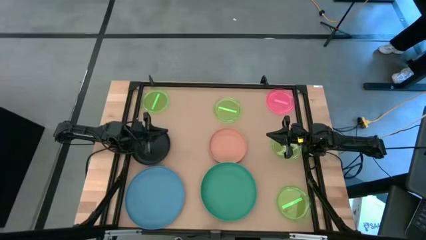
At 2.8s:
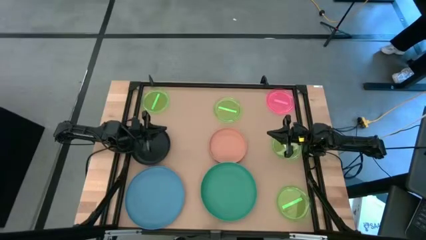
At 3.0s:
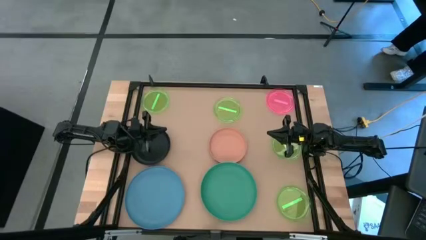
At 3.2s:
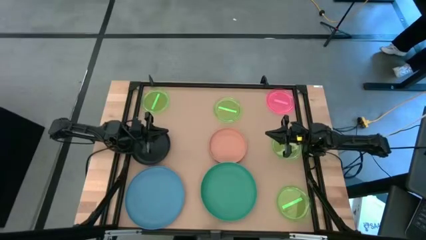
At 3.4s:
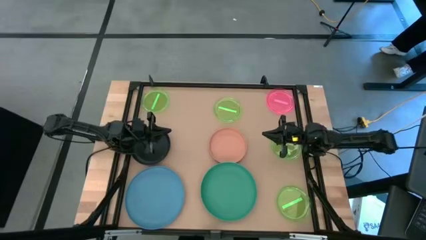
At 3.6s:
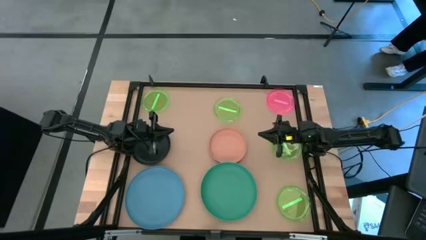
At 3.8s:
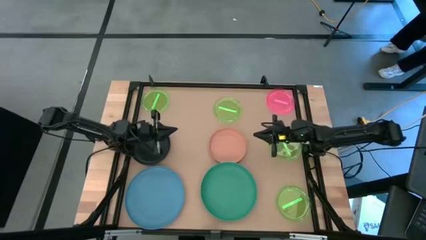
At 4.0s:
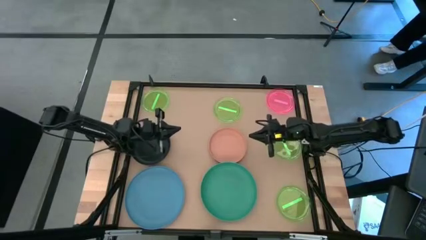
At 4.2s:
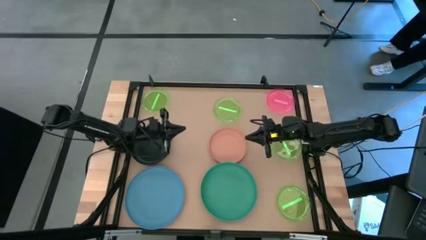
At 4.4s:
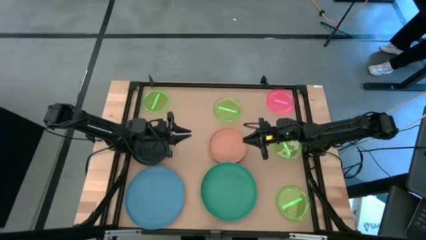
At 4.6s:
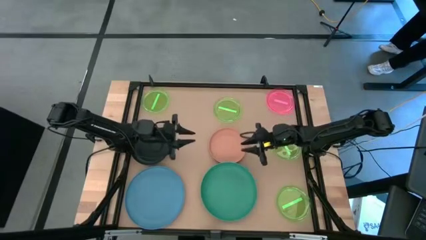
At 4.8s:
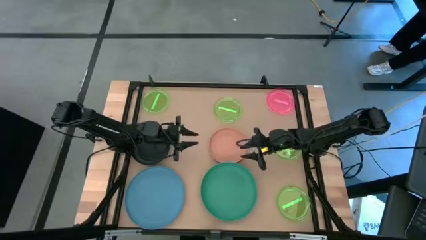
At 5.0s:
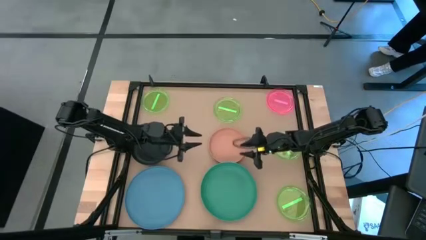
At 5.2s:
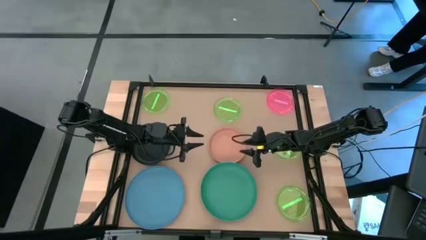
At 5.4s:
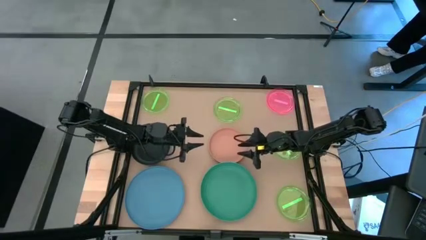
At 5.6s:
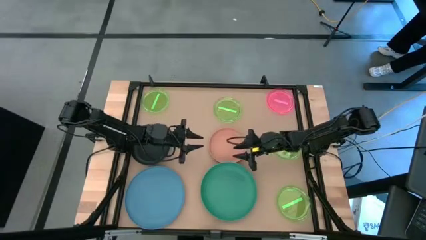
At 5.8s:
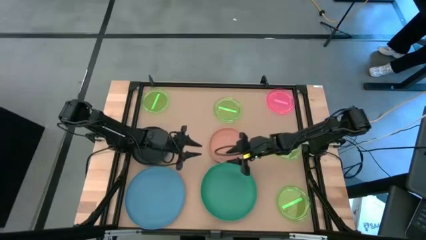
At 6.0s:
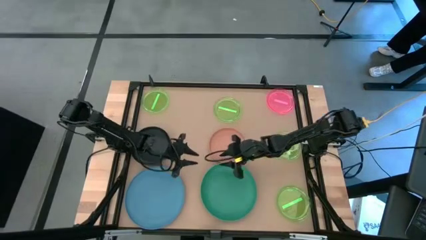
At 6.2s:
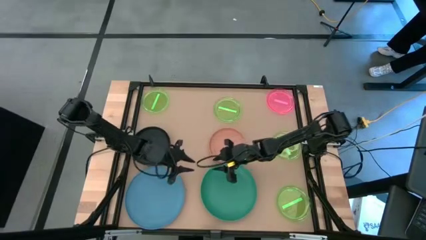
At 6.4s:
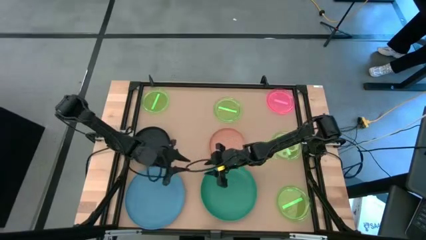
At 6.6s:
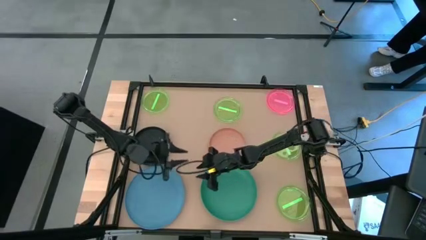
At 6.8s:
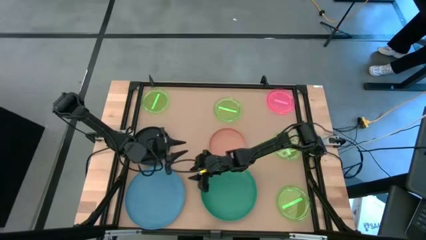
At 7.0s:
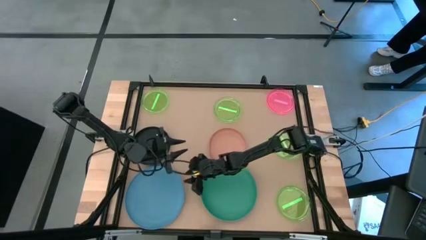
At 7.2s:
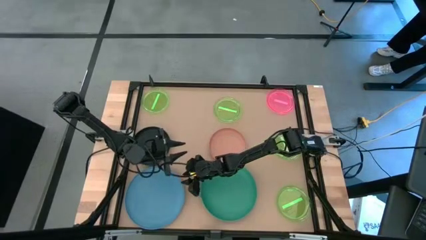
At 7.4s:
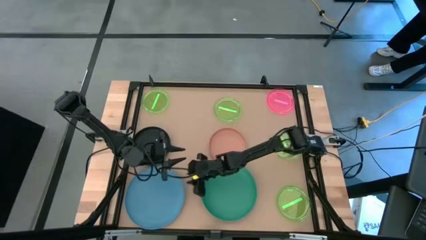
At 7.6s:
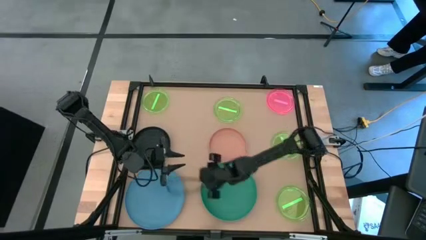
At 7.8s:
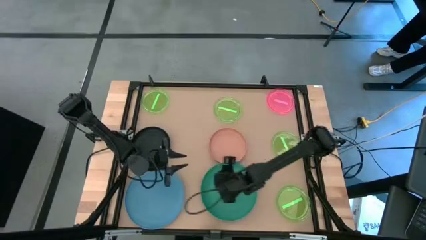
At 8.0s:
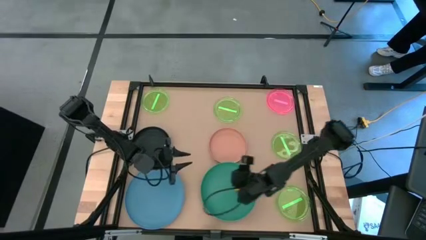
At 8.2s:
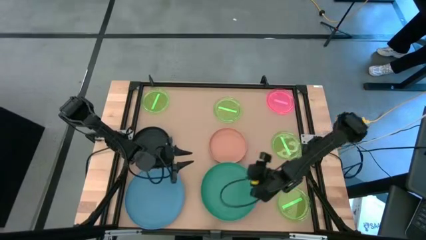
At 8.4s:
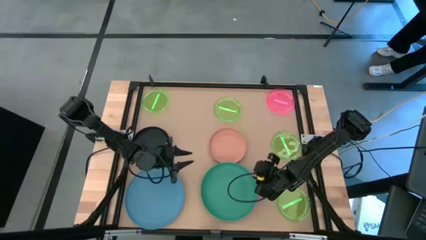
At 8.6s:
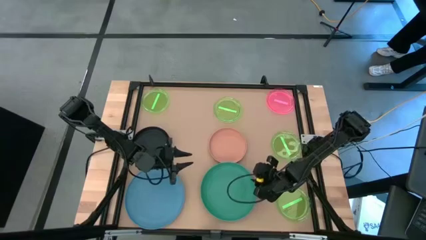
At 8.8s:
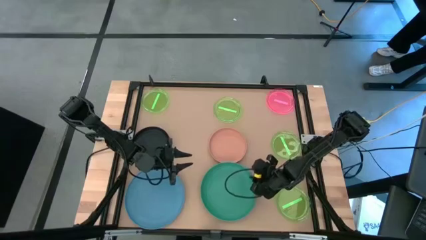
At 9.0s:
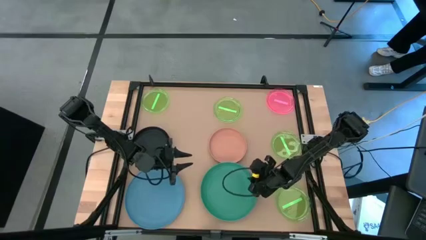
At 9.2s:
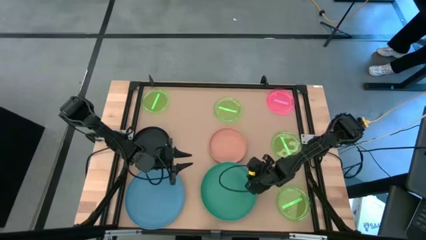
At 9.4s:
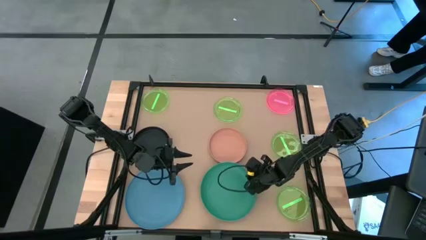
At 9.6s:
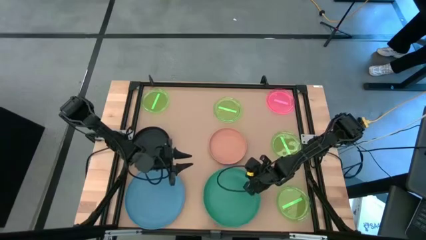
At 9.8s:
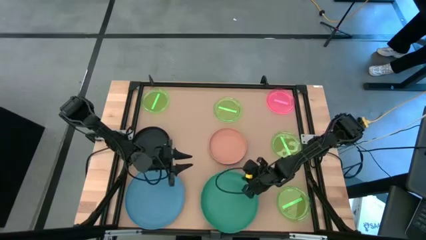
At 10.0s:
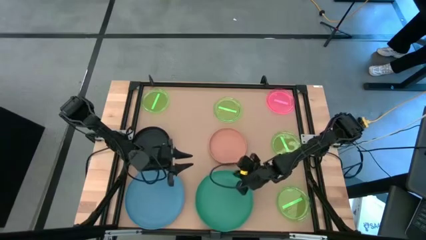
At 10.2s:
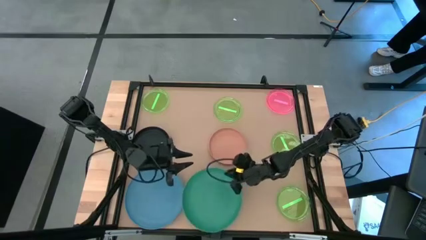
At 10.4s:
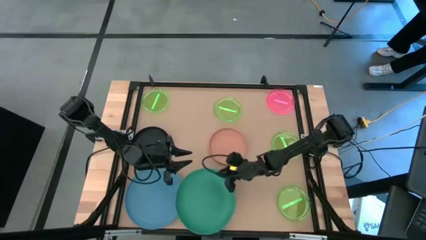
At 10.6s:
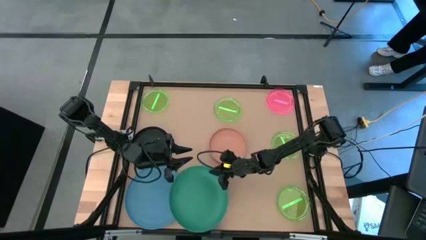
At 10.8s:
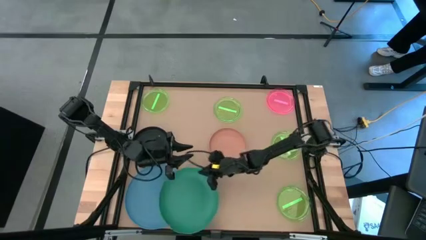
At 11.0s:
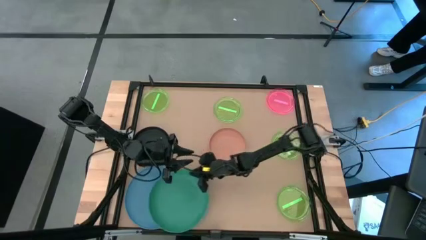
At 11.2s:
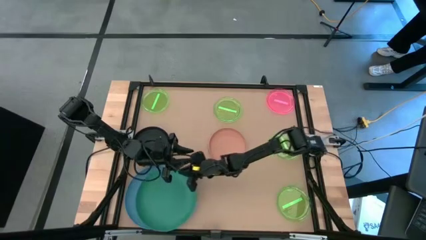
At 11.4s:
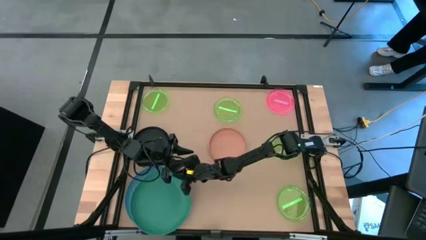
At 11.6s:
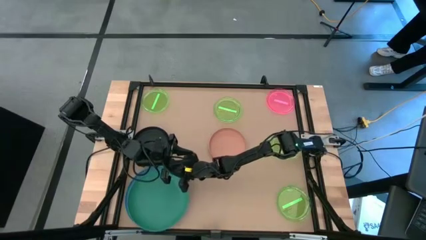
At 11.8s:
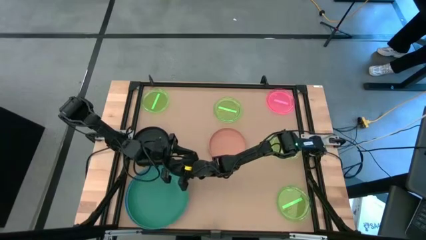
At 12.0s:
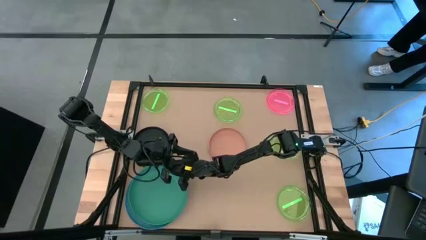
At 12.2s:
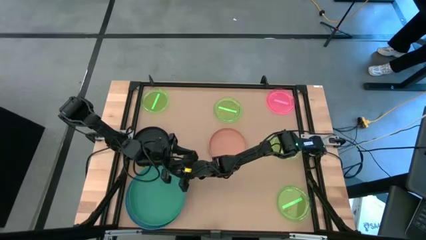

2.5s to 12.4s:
Task: Stack plastic plates
Stack the green plate on top of the blue plate

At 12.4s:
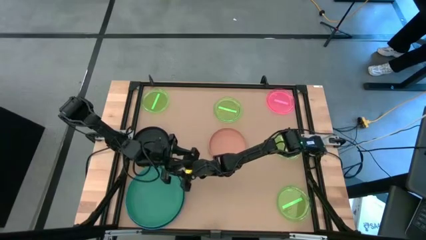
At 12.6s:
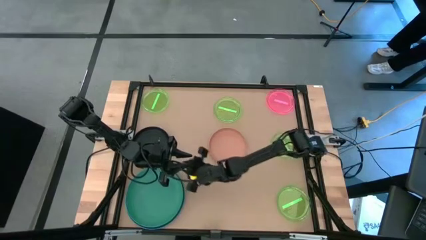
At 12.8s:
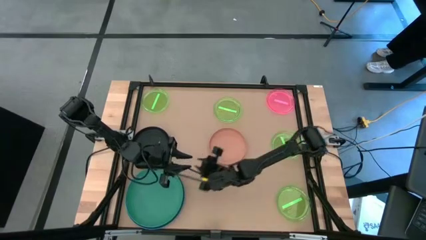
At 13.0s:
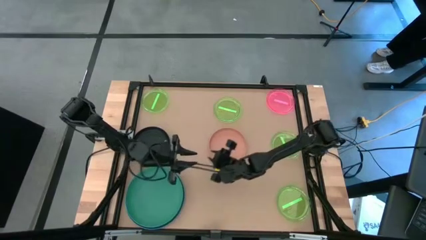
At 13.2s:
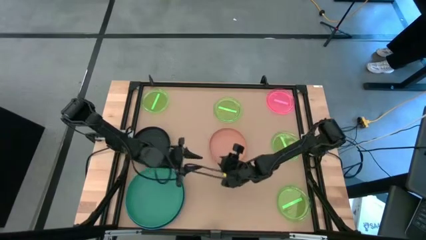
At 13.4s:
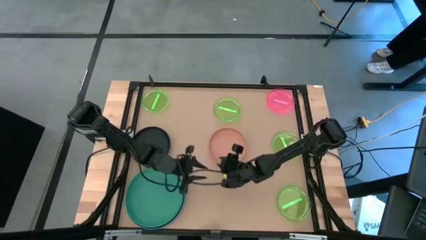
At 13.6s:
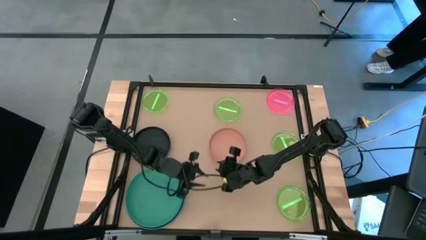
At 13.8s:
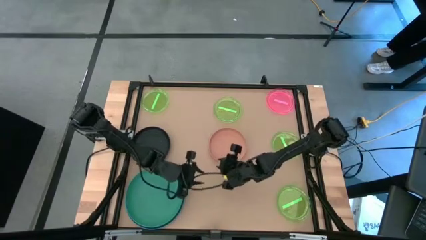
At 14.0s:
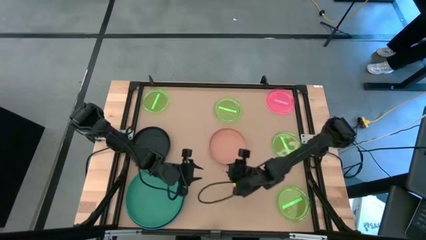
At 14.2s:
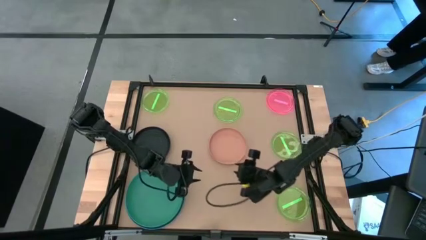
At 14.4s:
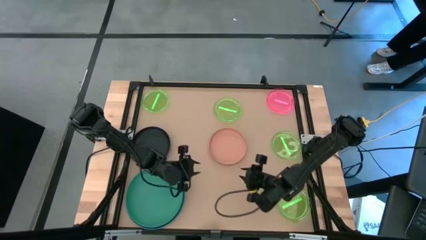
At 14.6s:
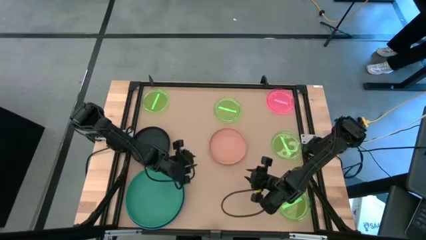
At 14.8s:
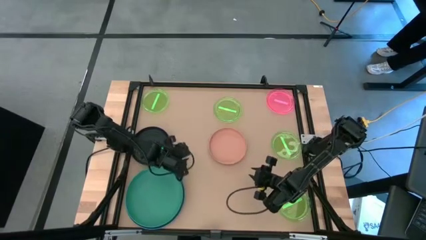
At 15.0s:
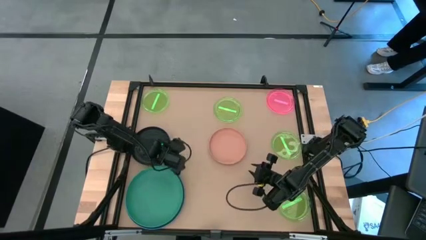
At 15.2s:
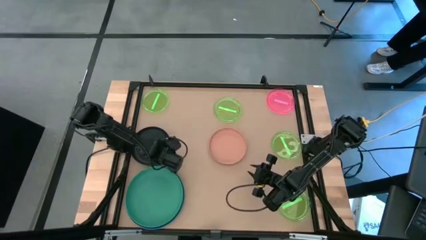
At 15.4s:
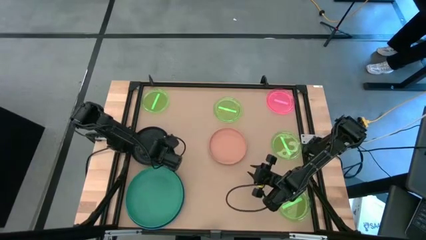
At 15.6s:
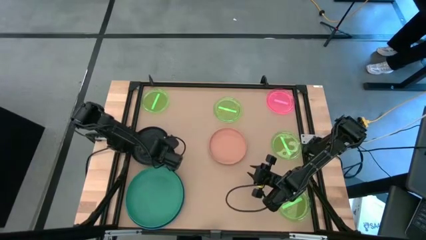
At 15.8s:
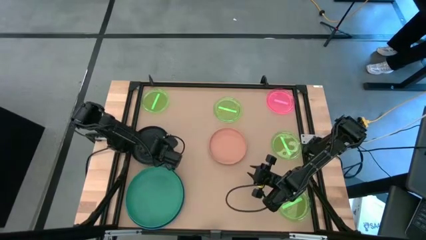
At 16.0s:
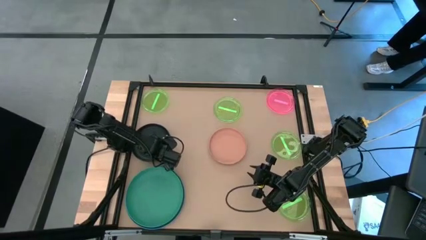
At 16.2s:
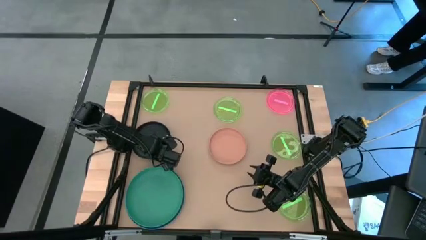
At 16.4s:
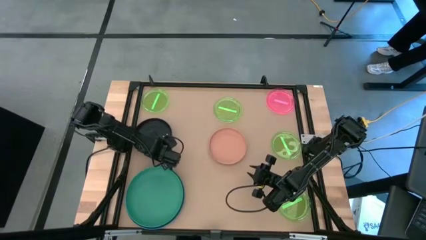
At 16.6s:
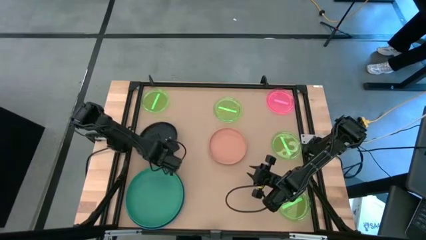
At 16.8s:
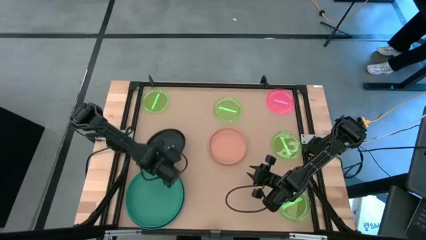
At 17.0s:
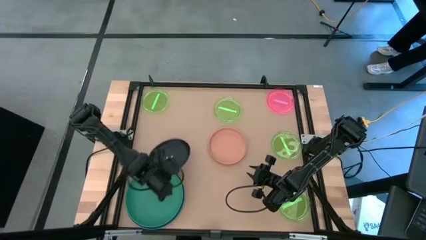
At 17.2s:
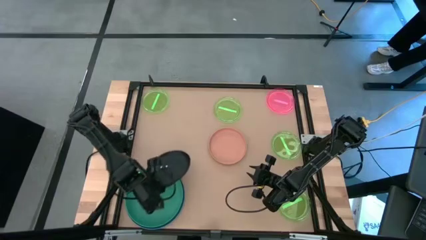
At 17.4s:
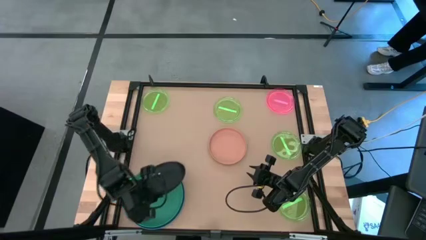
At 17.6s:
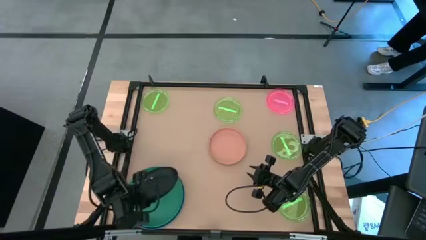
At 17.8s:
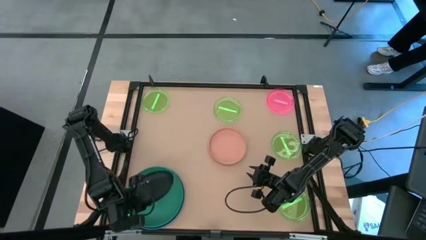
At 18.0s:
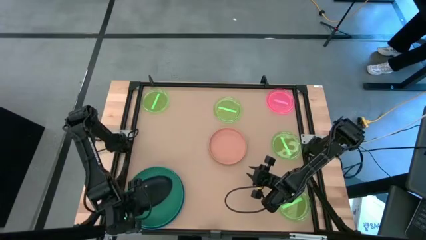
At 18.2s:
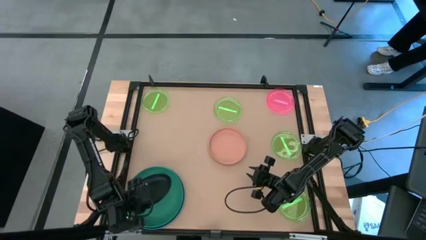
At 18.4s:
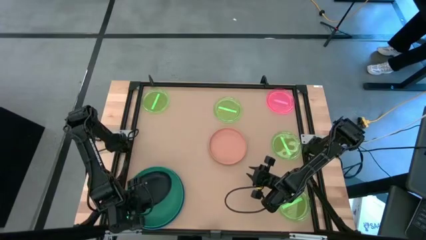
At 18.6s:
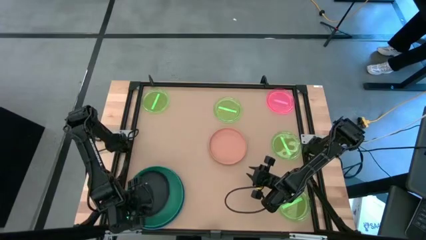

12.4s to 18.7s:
Stack the black plate on top of the green plate
